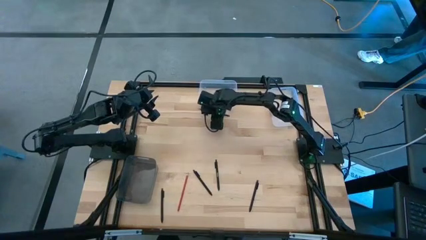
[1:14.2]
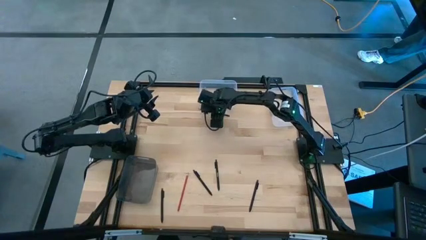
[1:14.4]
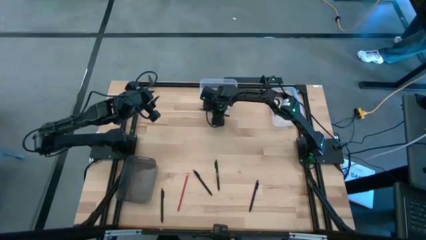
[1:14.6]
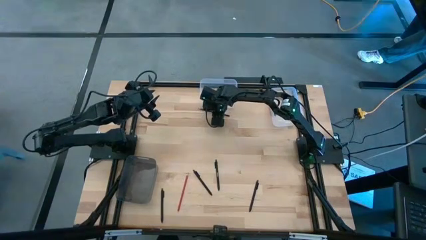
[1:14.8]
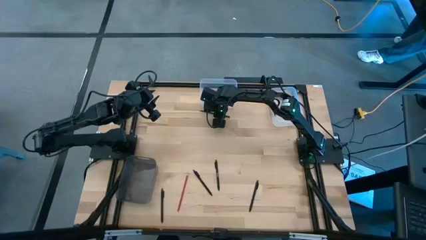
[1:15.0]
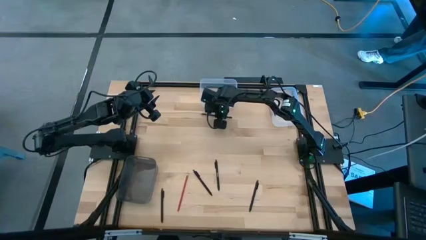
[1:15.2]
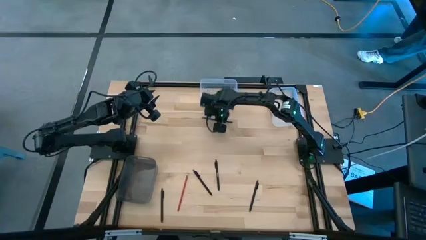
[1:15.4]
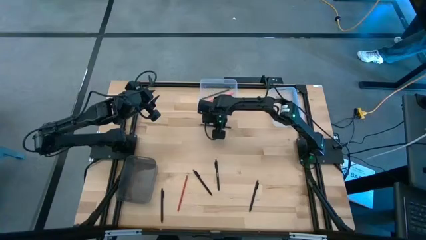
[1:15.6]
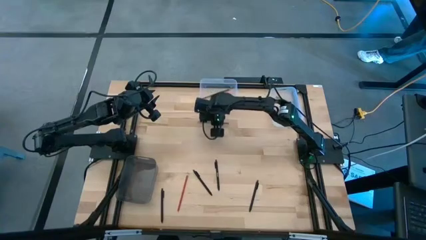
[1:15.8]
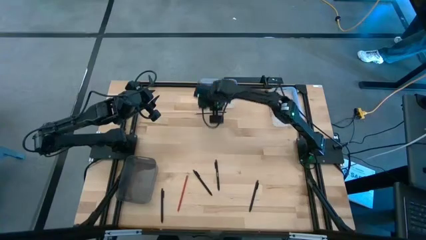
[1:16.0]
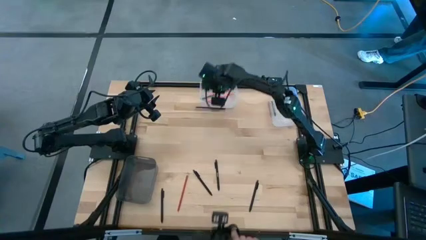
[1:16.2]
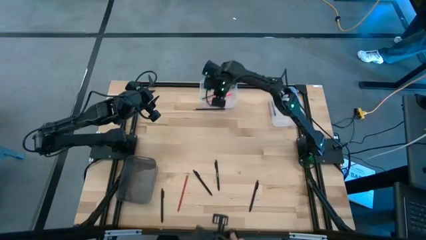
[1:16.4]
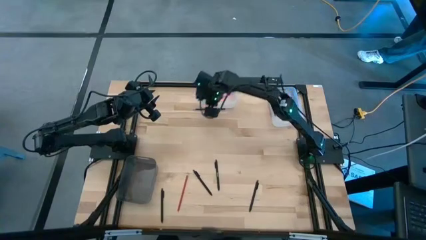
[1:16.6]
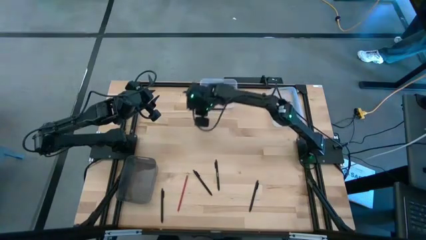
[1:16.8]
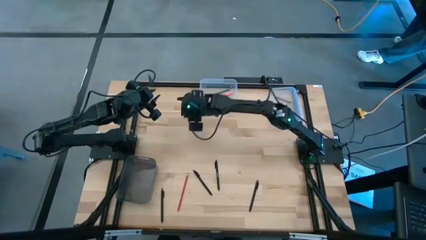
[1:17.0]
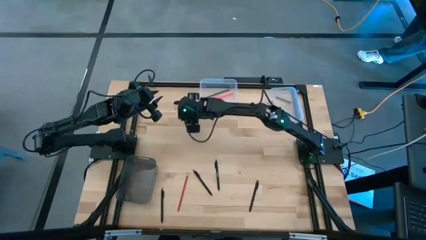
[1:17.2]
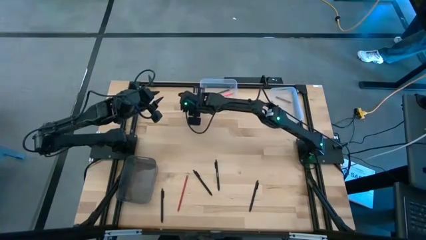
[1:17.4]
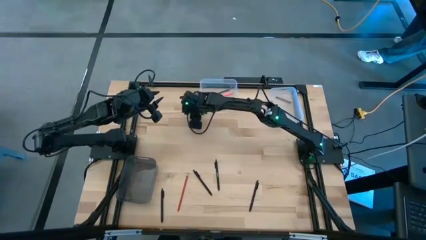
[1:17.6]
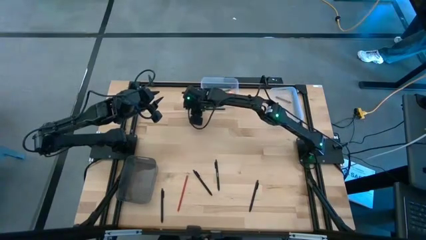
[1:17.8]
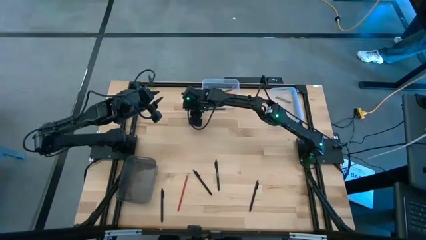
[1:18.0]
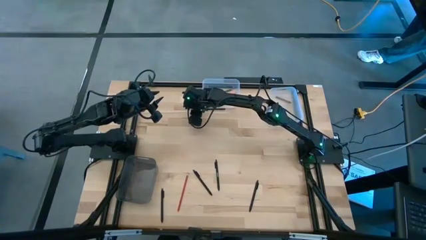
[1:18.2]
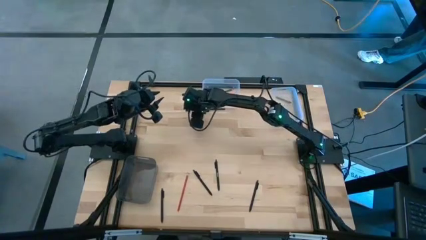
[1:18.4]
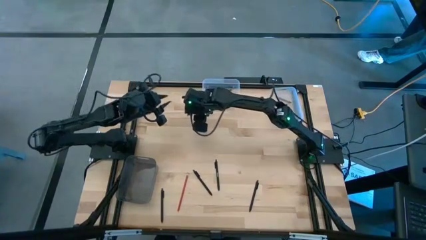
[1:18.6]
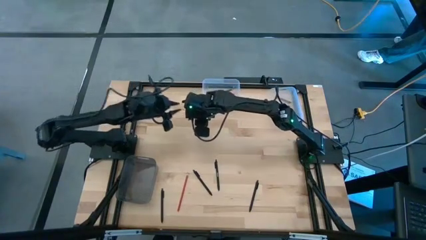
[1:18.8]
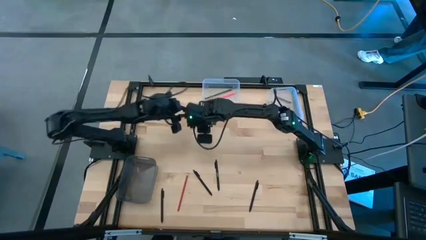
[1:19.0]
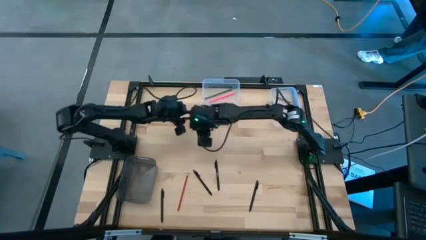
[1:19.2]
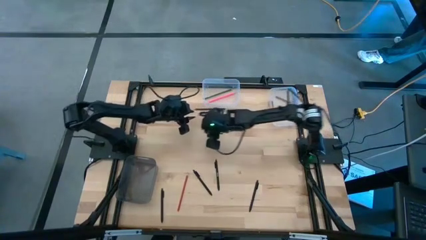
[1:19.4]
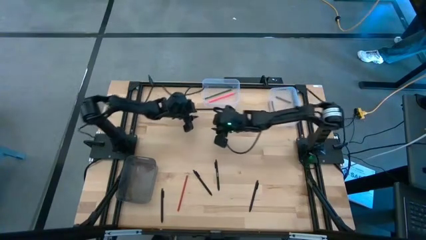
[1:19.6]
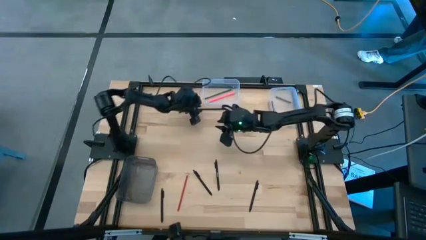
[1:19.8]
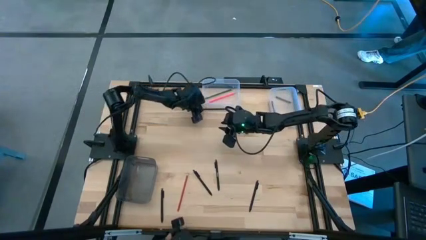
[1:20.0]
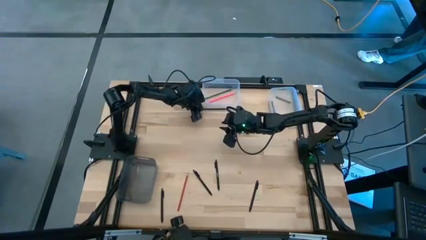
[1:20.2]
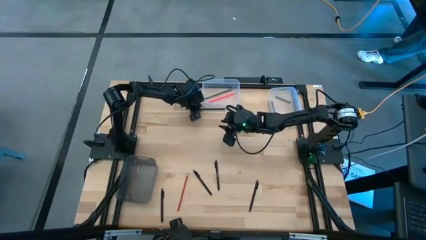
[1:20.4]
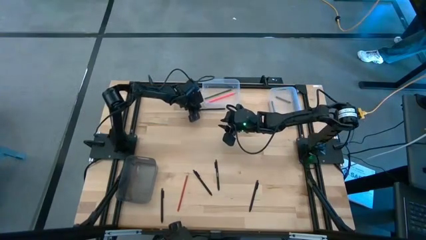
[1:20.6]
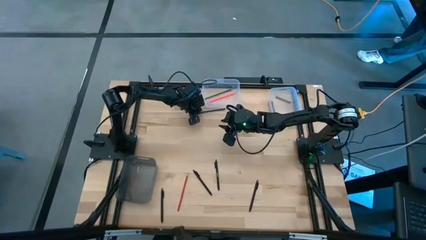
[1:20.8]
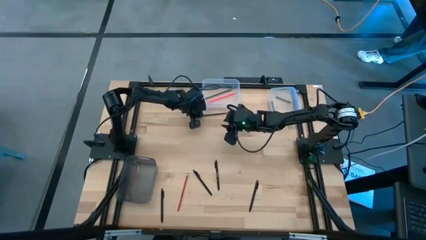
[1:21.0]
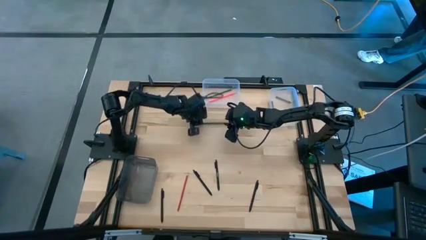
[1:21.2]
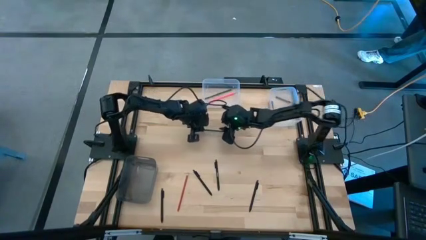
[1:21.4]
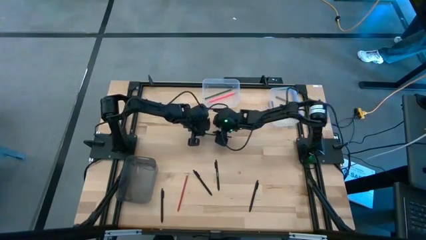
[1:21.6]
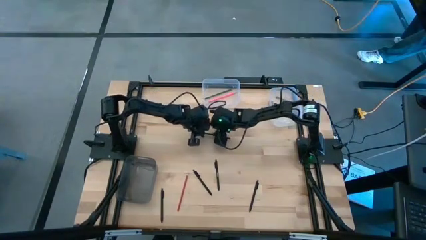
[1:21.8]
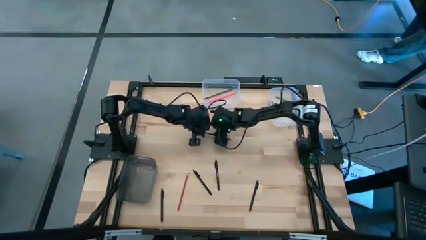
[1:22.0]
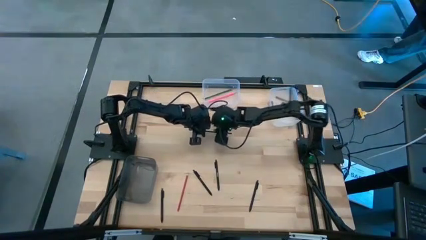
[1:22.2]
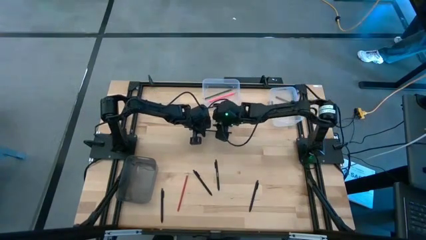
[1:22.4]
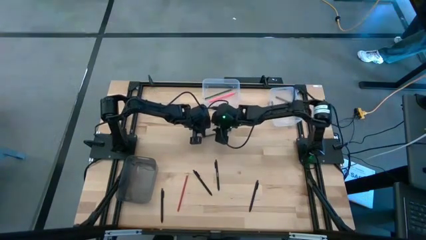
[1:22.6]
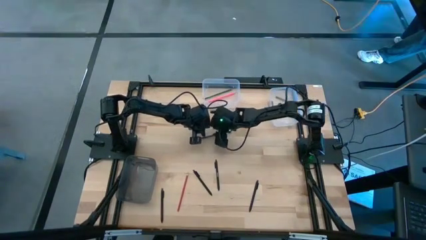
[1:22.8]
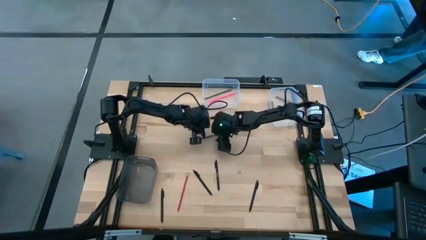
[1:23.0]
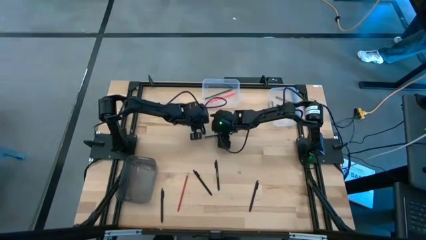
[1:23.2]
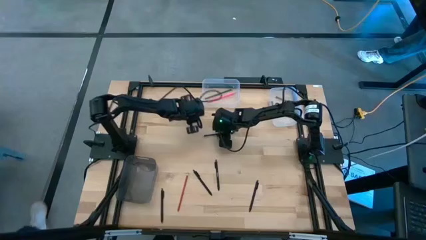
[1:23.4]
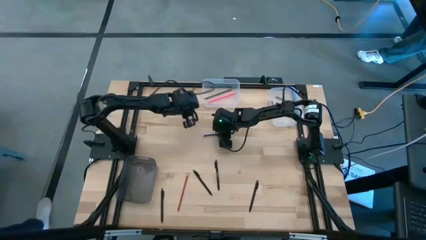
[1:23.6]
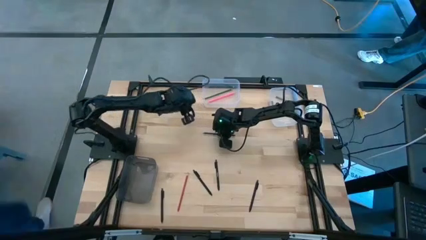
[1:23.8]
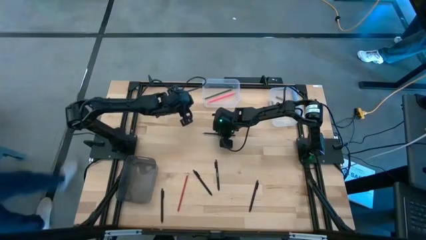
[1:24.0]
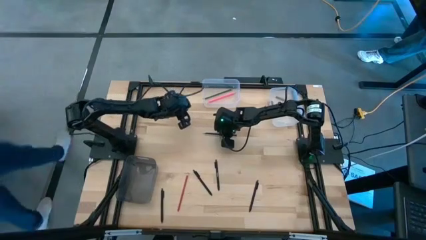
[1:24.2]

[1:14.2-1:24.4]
Task: Sort crayons/erasers/pens/pencils in bins
Put the blue pencil into the left transparent bin

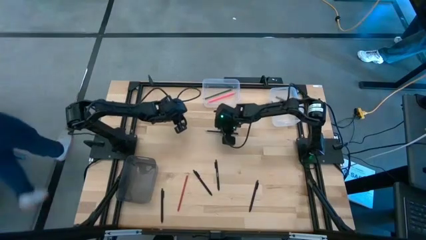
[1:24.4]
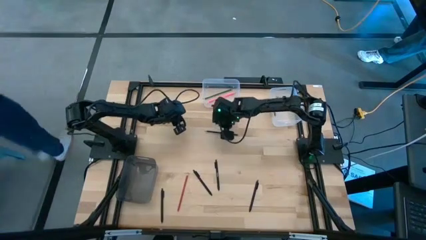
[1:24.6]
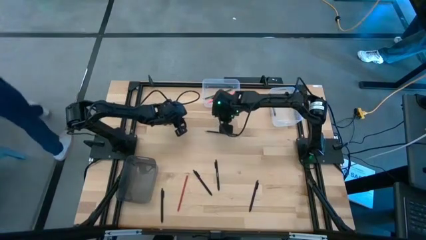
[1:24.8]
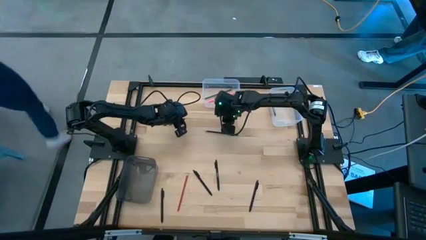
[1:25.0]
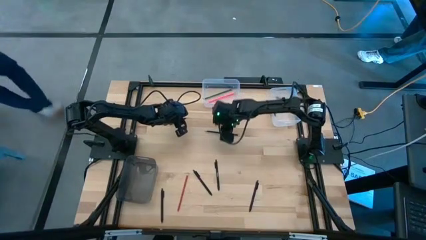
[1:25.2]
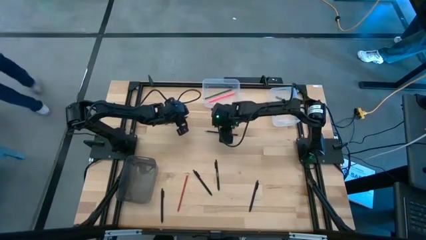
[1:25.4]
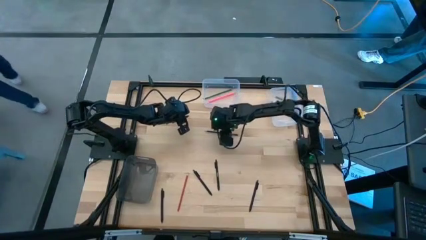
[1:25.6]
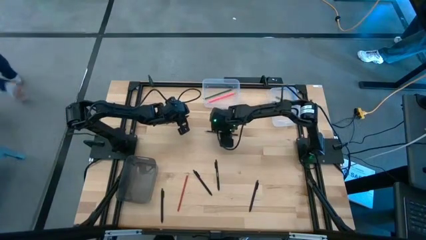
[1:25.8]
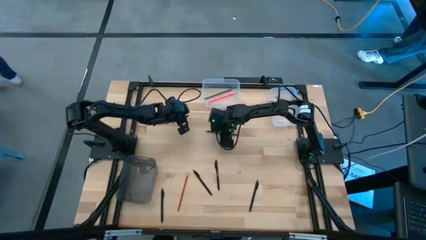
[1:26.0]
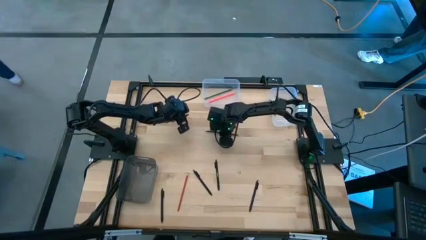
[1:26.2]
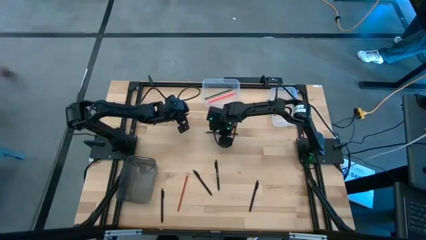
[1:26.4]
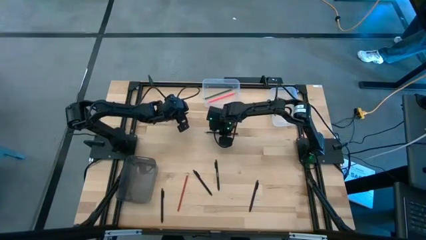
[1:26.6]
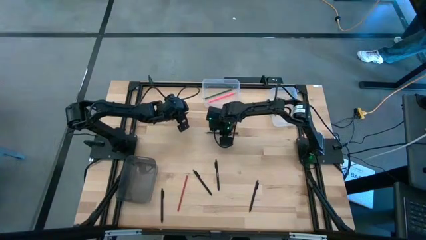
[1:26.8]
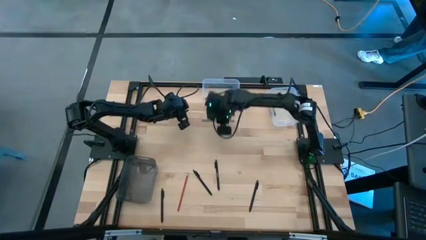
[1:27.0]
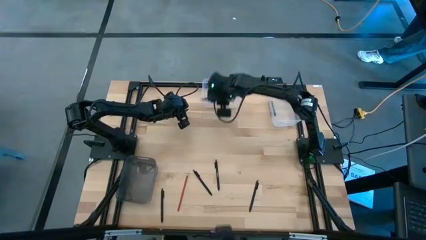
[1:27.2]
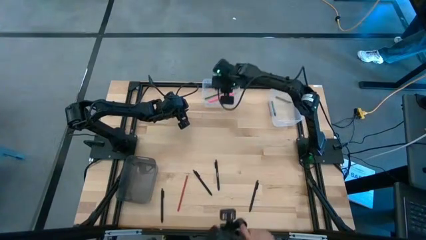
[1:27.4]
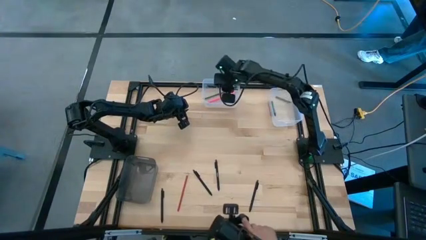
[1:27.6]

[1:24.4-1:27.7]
Put the blue pencil into the left transparent bin
